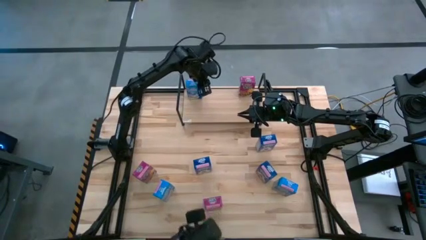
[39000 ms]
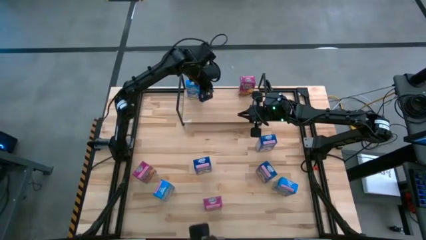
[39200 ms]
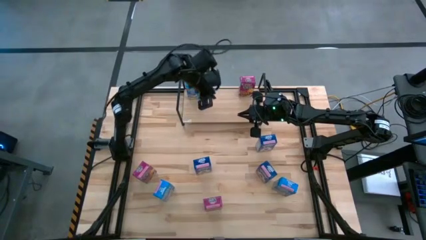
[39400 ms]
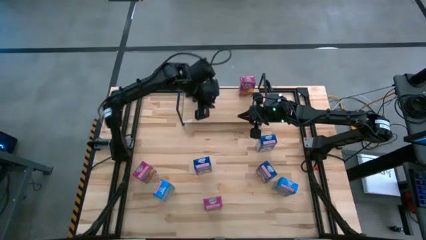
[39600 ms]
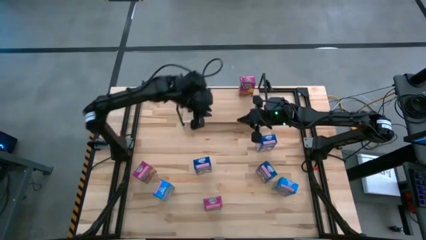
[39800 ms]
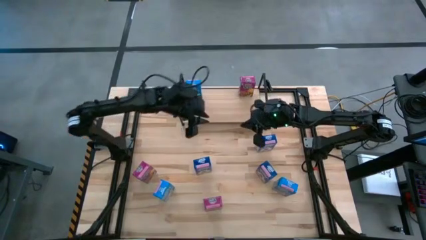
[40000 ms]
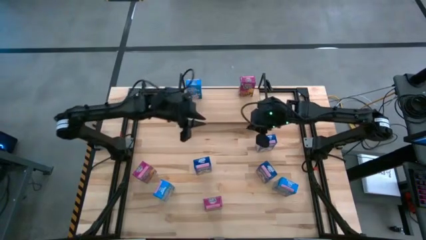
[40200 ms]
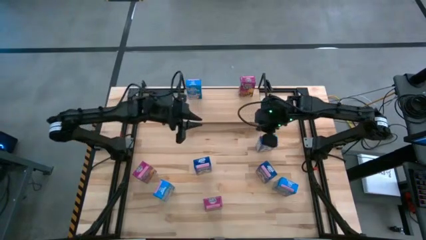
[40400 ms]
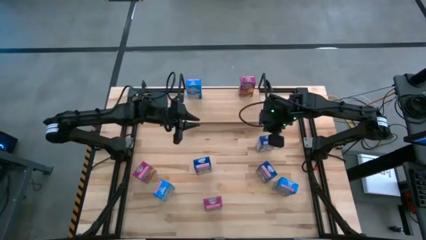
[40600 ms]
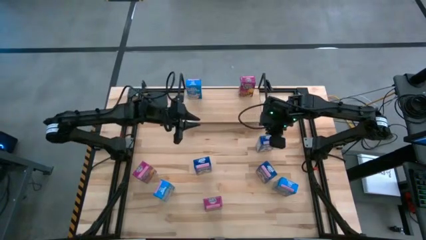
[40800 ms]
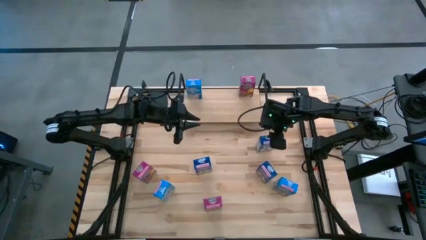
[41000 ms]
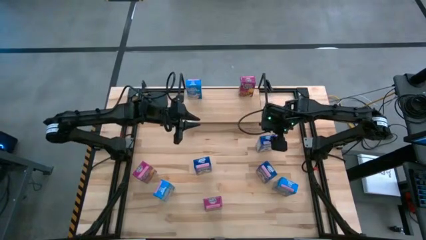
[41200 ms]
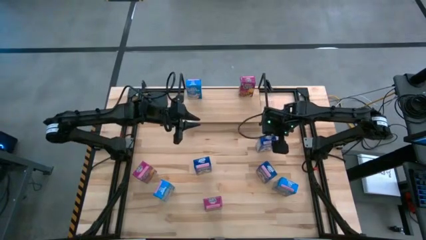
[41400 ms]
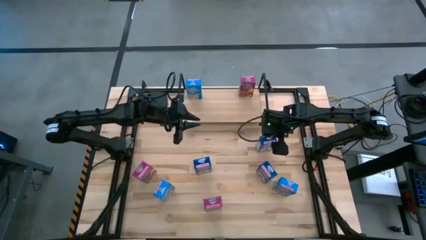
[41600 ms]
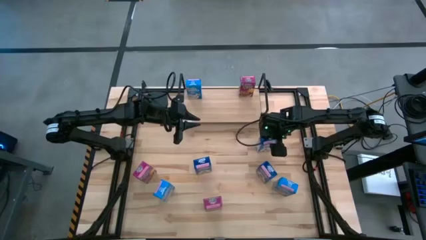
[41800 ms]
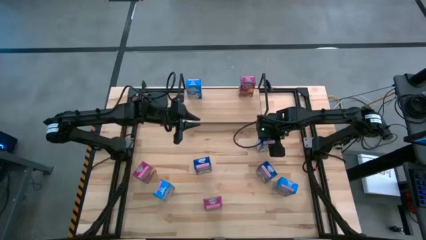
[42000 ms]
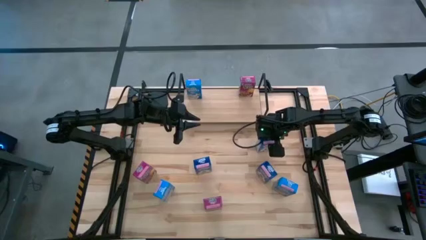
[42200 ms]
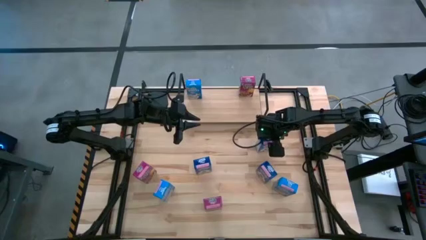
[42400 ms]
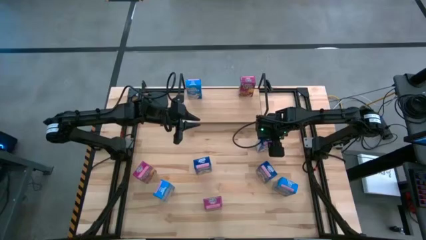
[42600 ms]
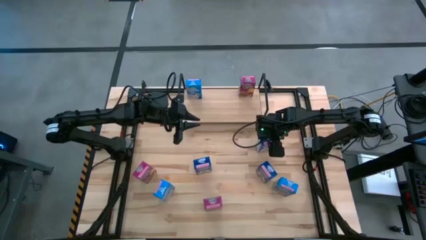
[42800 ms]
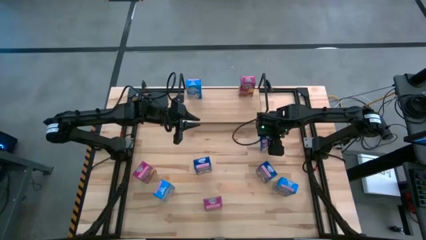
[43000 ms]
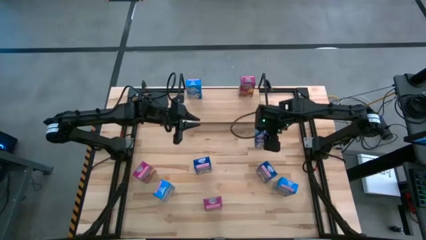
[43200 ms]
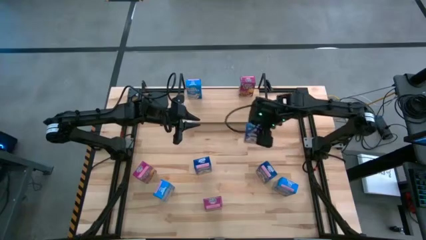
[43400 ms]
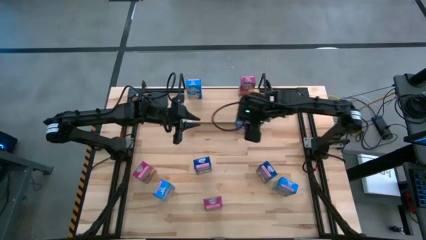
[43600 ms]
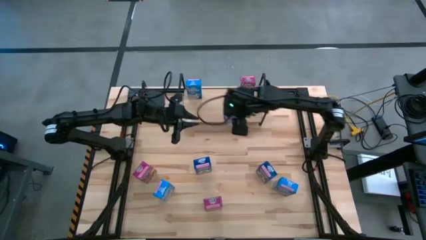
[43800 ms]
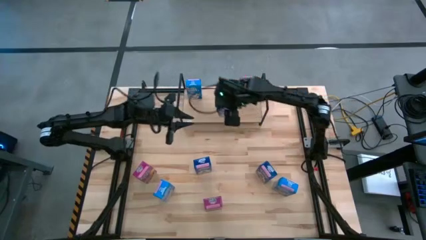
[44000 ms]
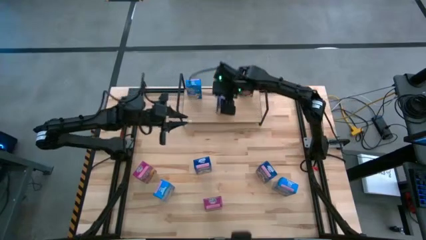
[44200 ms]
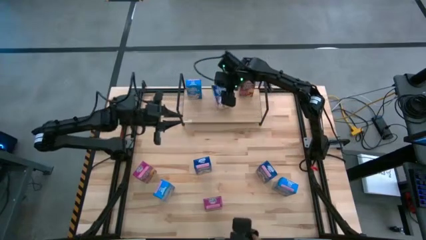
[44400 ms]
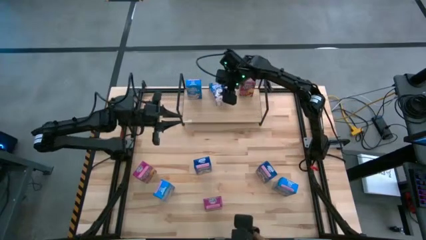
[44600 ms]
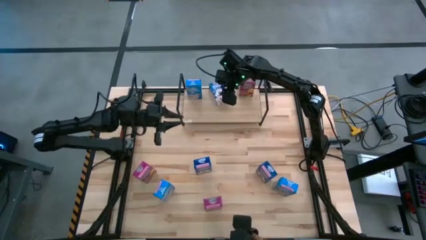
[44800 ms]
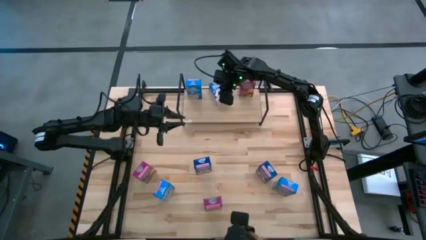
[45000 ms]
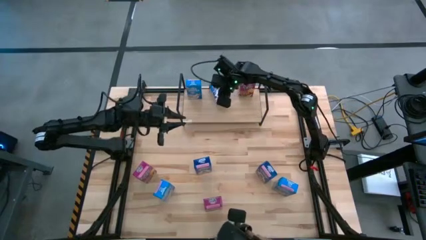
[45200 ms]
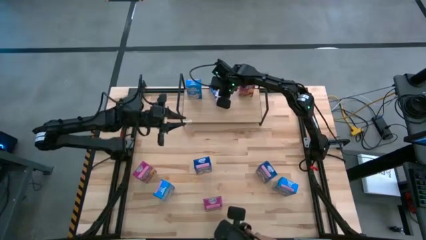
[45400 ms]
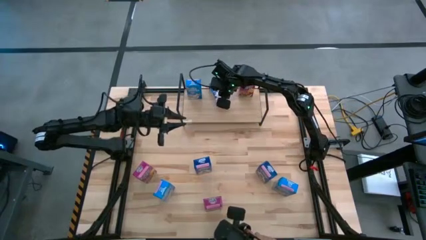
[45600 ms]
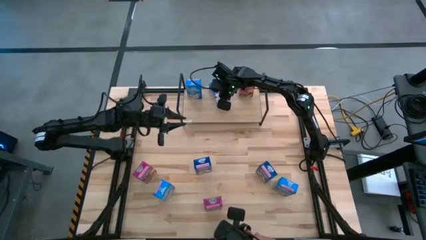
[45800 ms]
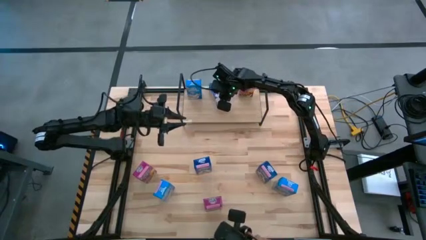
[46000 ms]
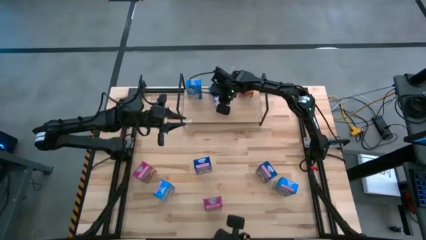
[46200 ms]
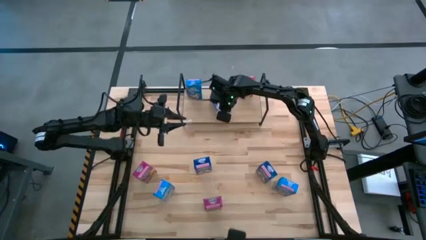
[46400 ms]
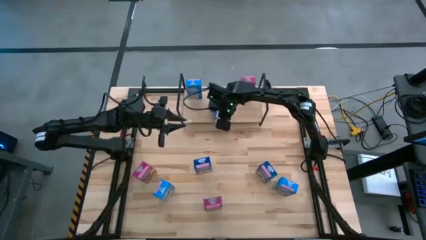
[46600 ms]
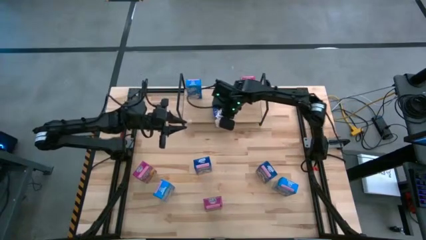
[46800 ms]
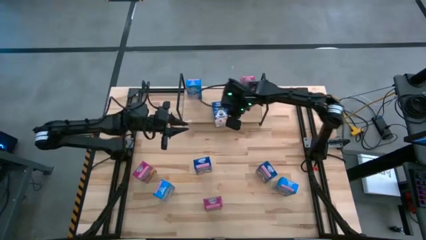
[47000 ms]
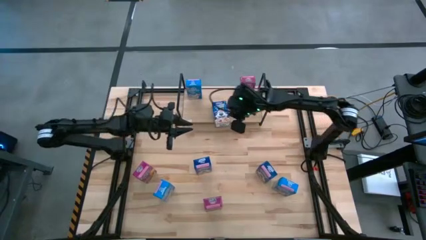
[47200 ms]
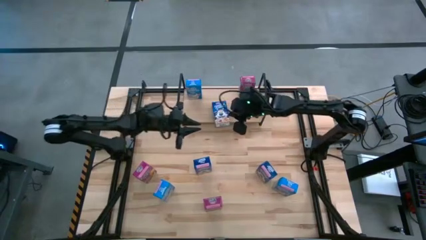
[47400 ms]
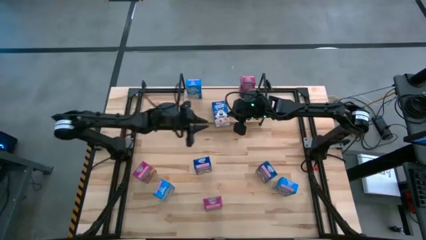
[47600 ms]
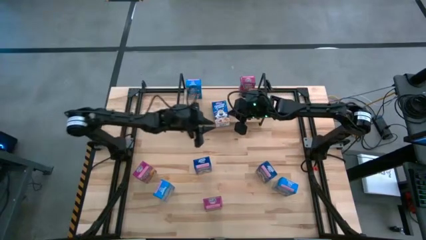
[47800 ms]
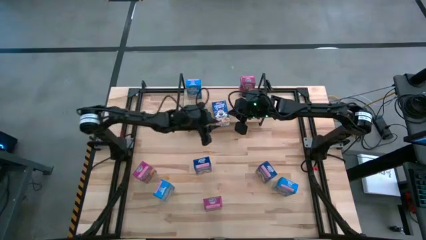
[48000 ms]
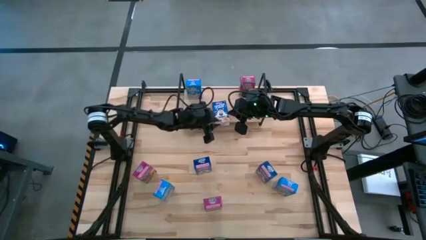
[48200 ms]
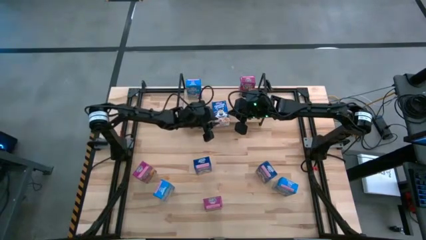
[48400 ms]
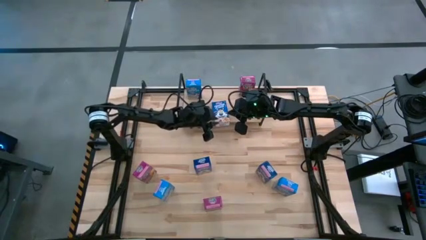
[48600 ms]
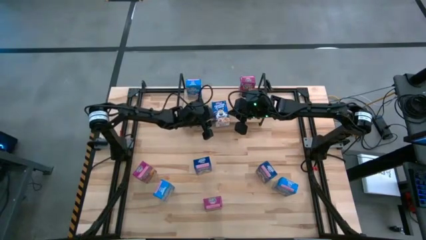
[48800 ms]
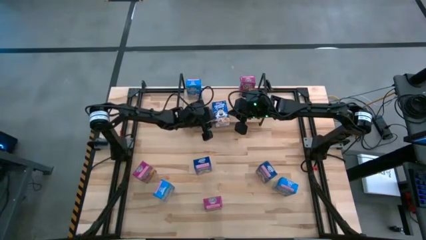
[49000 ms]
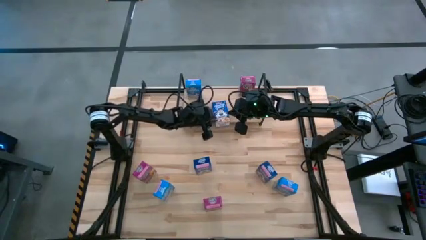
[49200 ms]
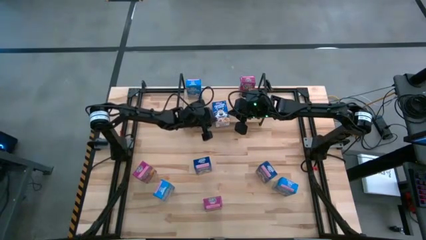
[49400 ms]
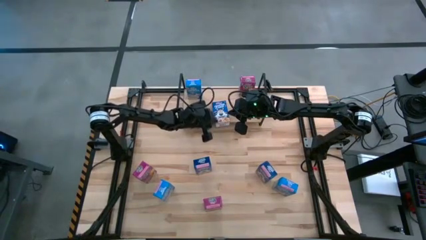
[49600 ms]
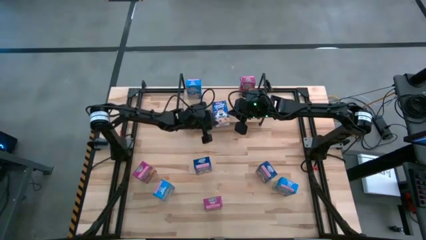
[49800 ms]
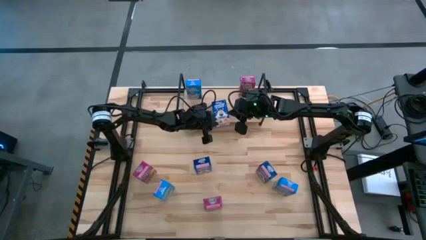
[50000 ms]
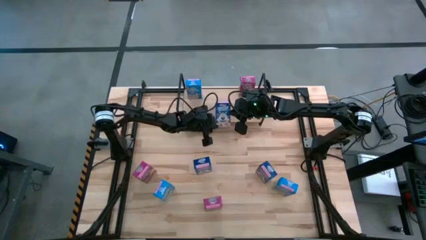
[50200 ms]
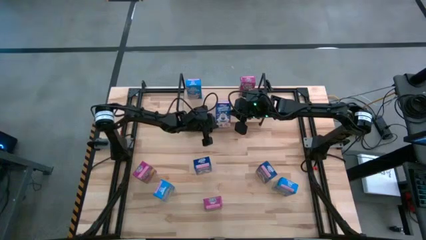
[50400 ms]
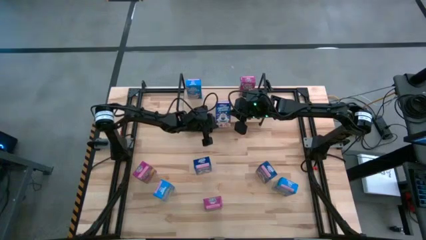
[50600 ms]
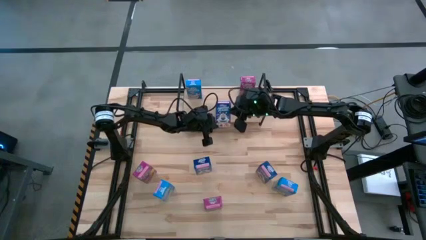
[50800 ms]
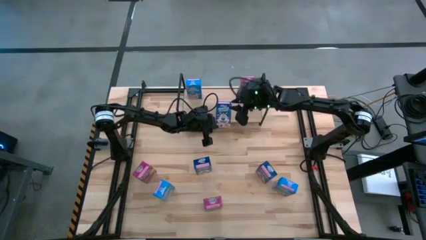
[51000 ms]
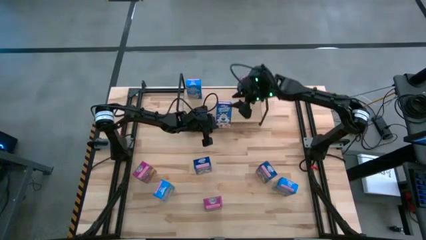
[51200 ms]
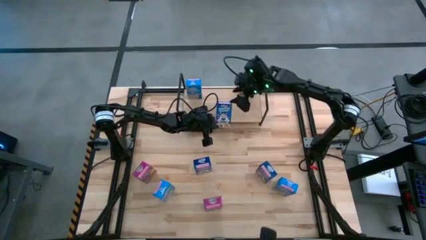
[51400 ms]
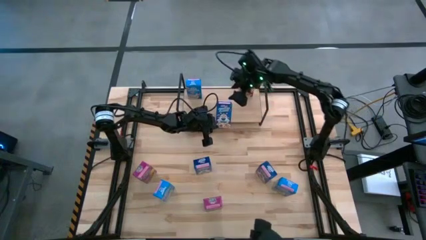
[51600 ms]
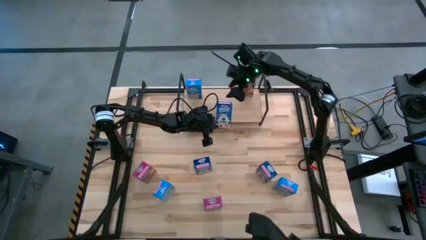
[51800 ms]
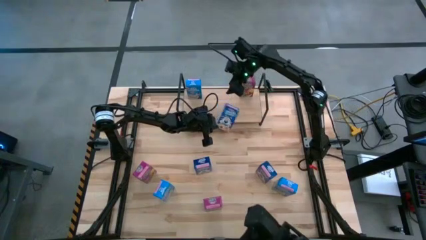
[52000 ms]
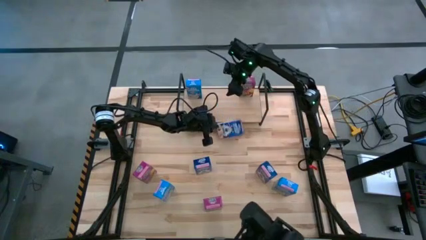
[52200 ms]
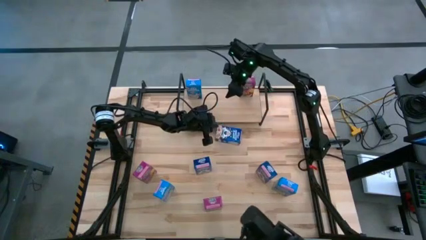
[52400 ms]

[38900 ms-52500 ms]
Task: Stack cereal on shelf
Put the top dark blue cereal box on the shelf

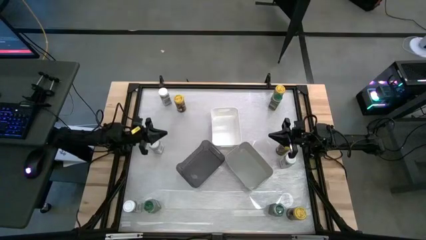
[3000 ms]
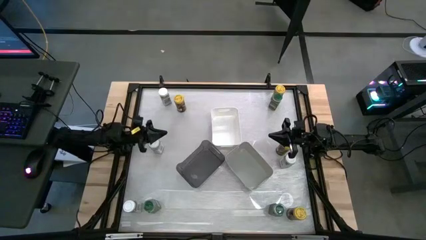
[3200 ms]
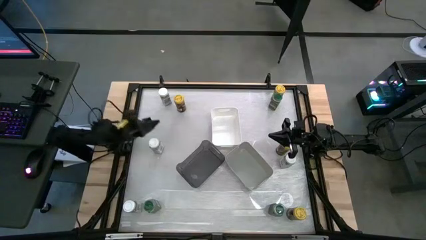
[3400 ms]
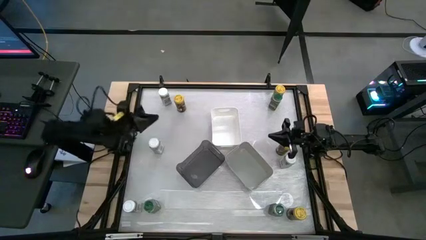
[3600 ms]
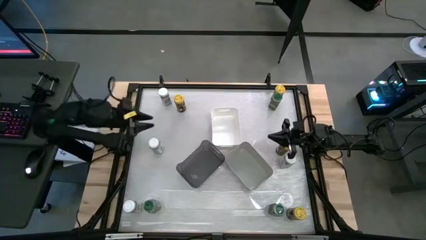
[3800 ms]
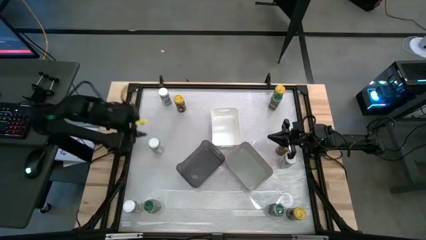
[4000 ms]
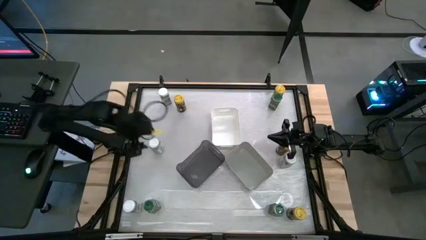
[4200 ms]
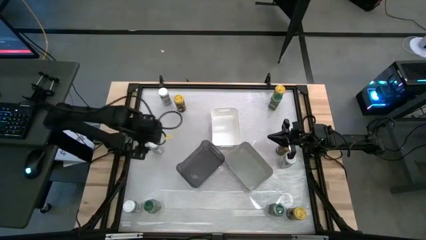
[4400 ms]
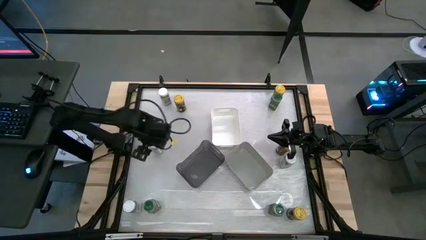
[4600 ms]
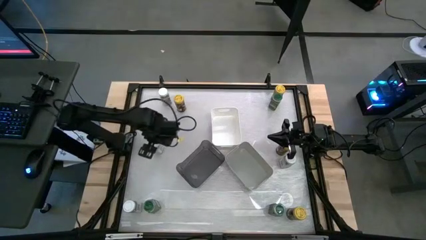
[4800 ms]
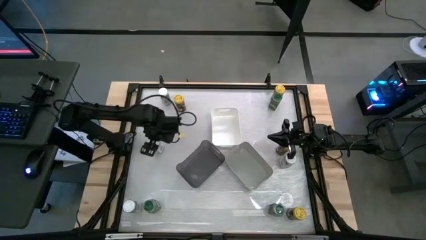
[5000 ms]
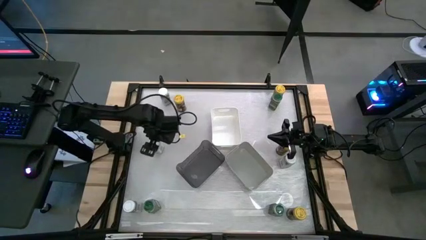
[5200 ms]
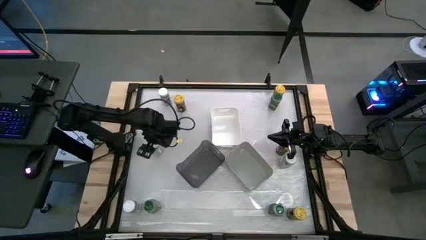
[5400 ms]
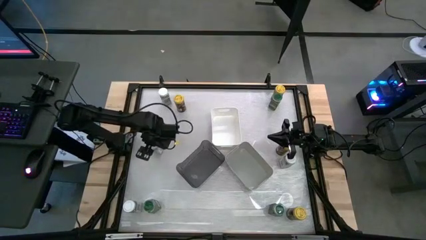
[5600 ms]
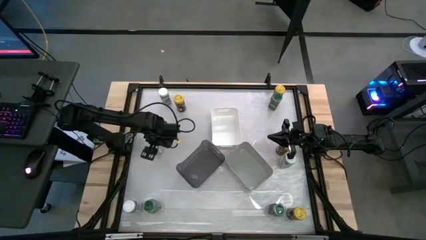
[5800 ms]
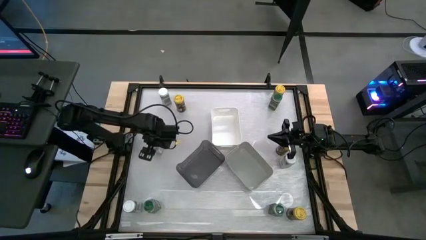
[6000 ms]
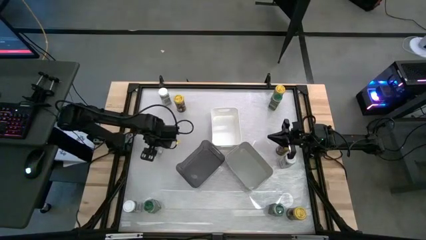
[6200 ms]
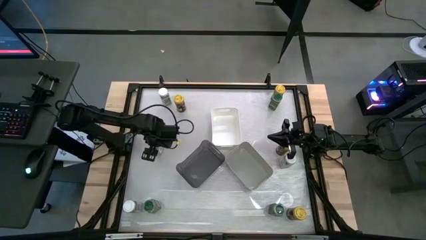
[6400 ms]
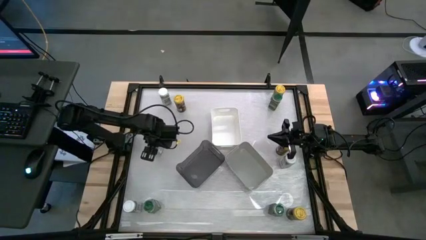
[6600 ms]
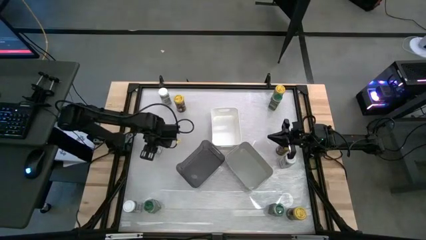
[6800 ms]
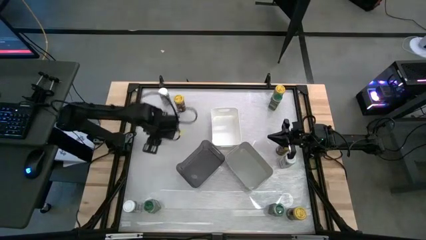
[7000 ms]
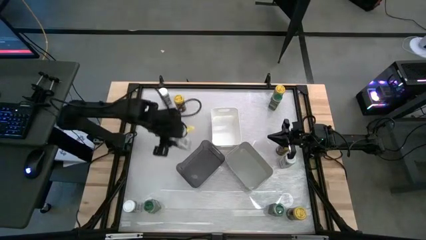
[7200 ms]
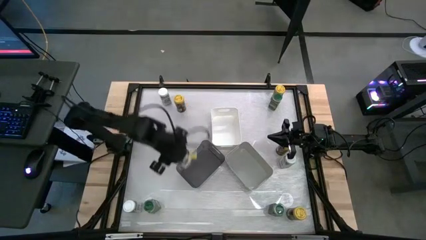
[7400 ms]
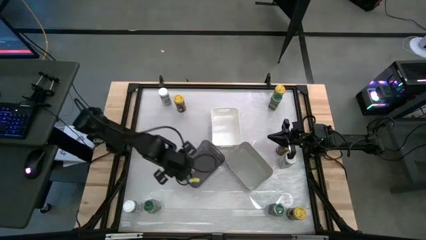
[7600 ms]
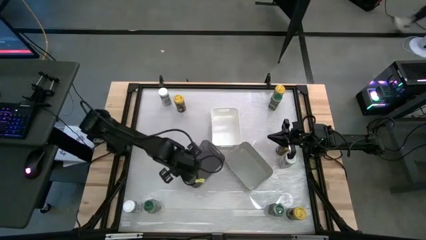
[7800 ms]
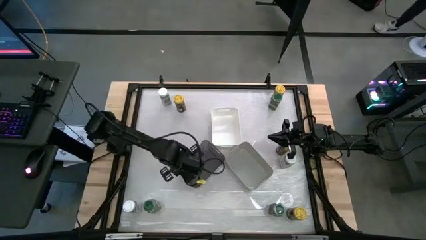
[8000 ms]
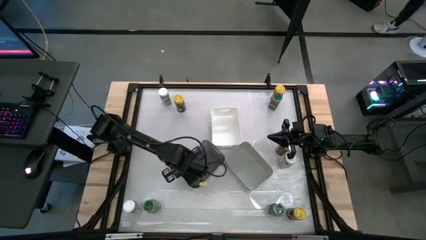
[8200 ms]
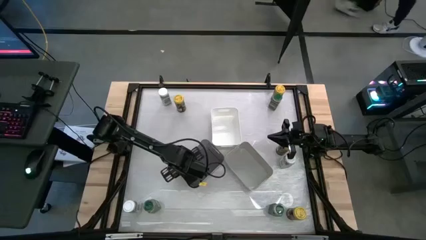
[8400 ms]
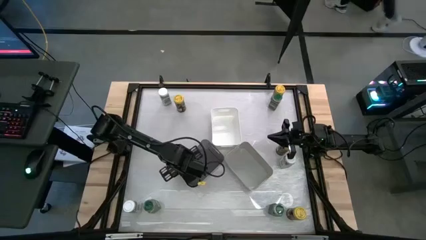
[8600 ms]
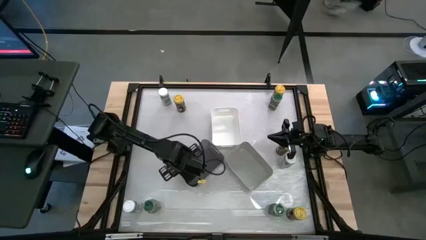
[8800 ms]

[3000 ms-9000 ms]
Task: Sort spices by type
Put the white seasoning bottle into the black bin
